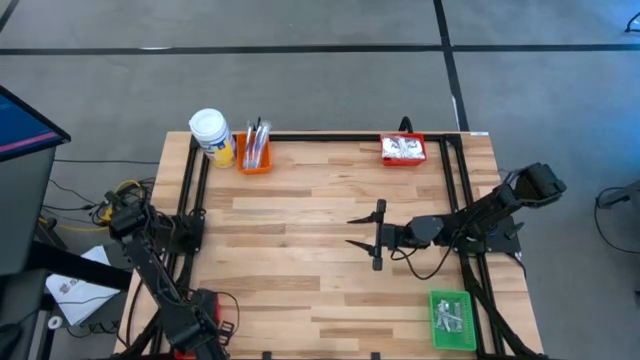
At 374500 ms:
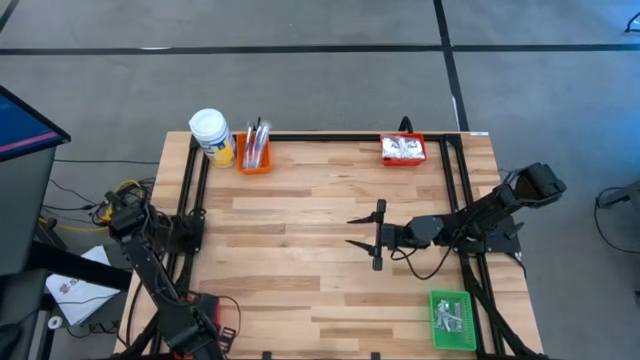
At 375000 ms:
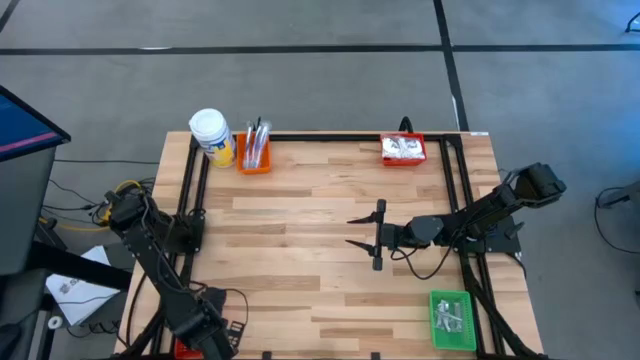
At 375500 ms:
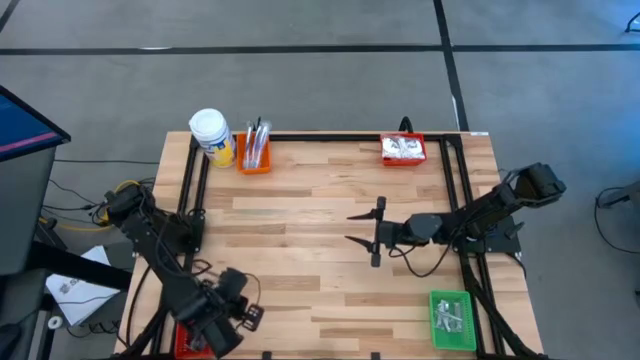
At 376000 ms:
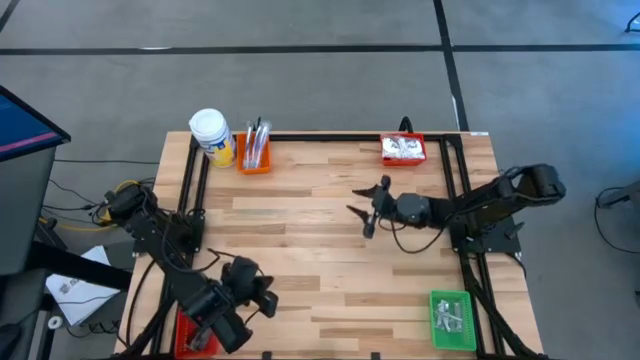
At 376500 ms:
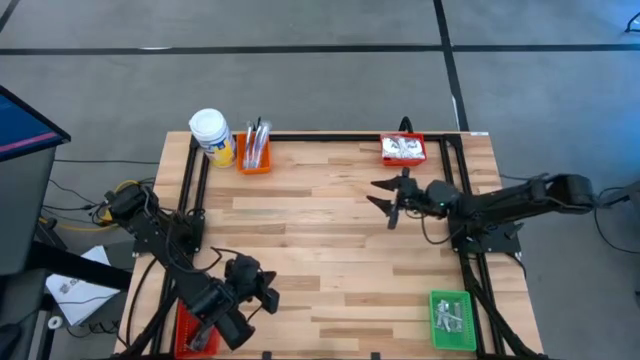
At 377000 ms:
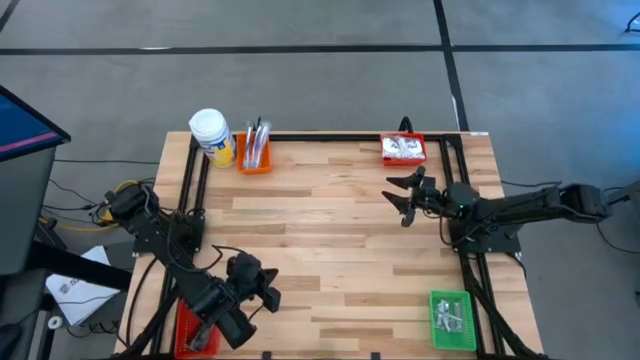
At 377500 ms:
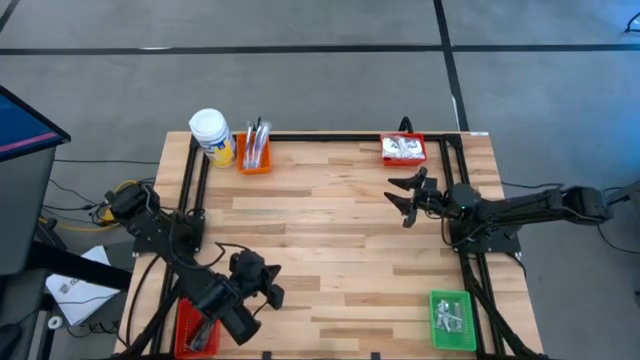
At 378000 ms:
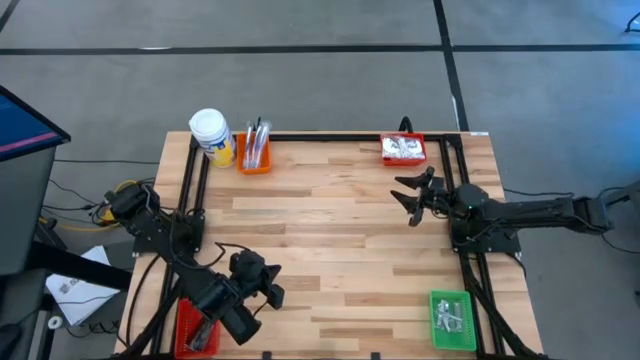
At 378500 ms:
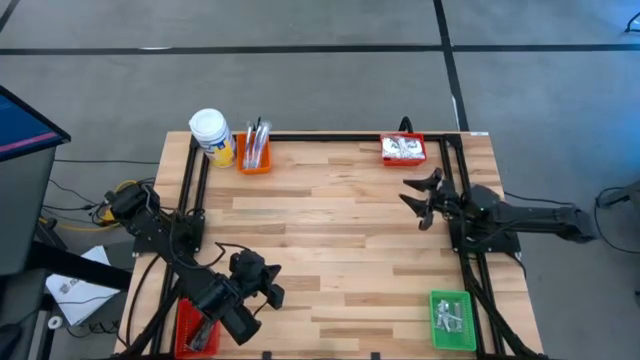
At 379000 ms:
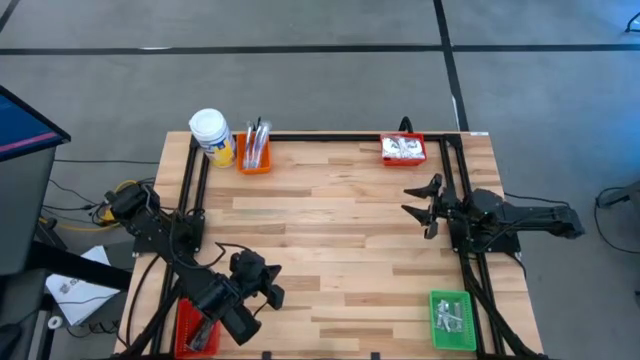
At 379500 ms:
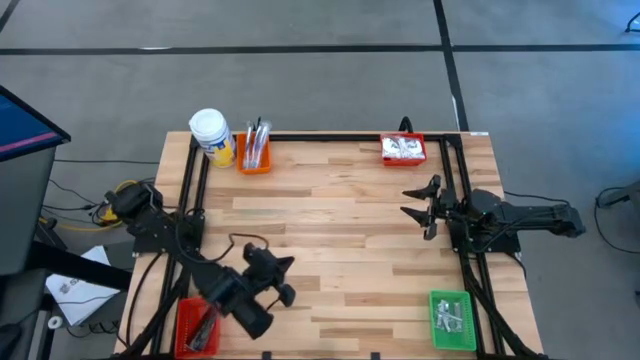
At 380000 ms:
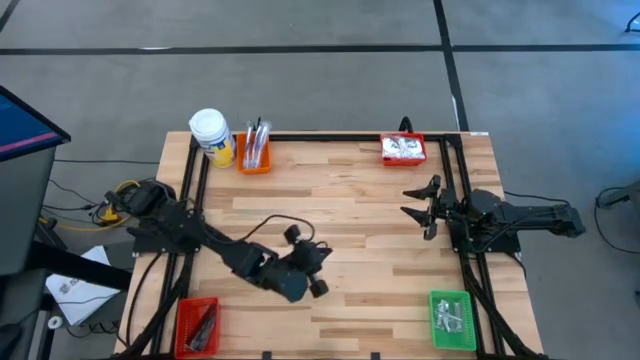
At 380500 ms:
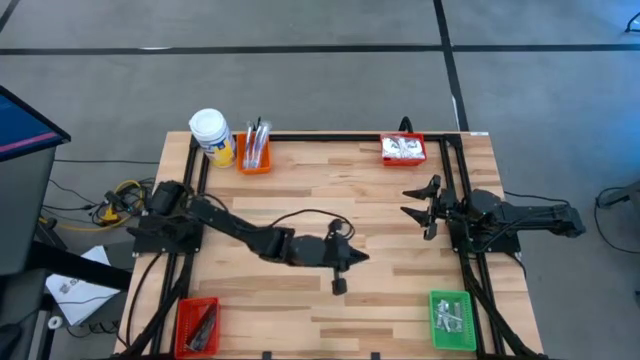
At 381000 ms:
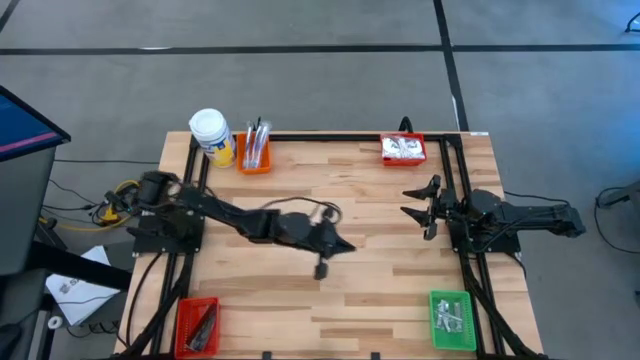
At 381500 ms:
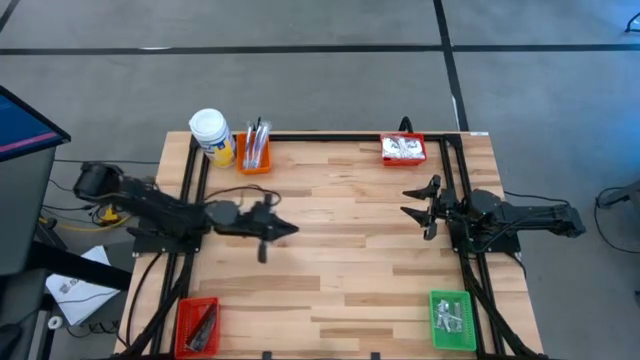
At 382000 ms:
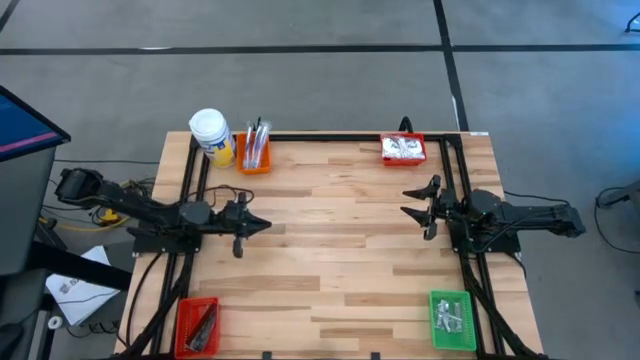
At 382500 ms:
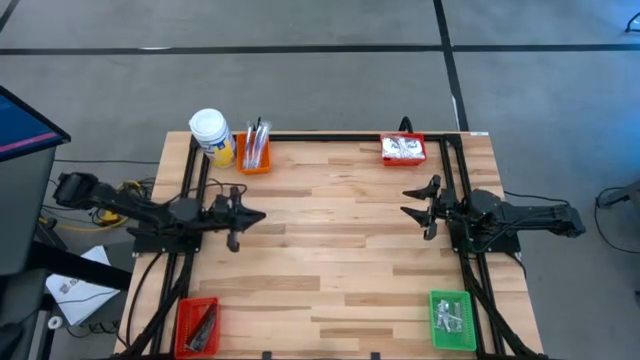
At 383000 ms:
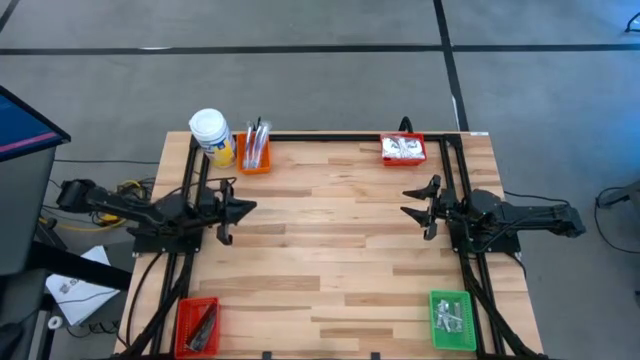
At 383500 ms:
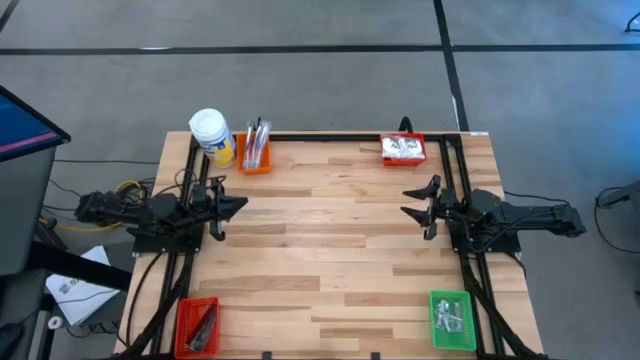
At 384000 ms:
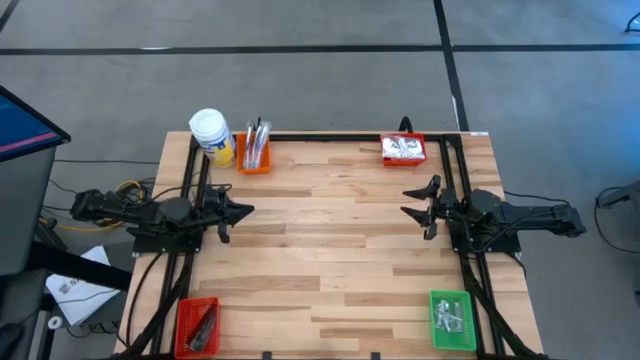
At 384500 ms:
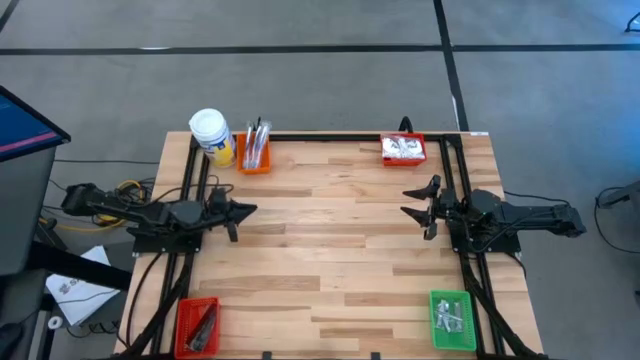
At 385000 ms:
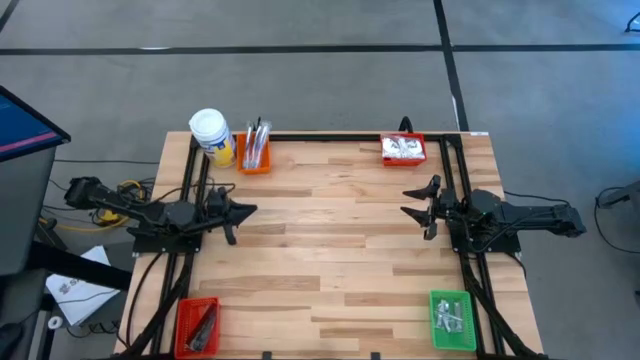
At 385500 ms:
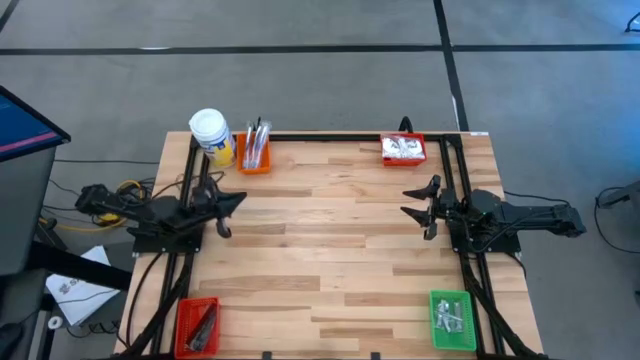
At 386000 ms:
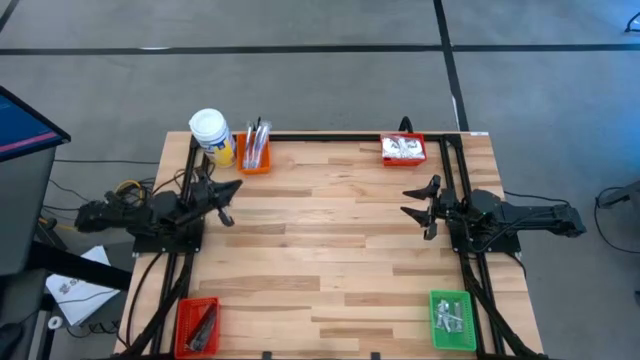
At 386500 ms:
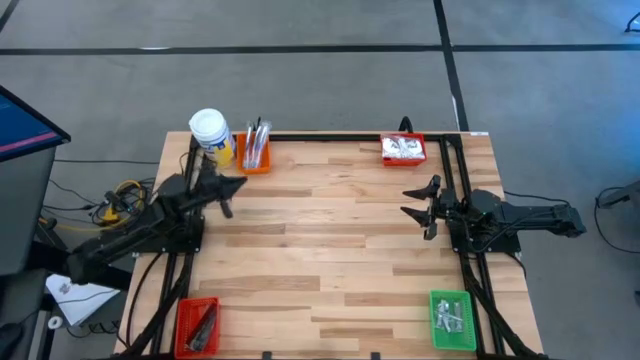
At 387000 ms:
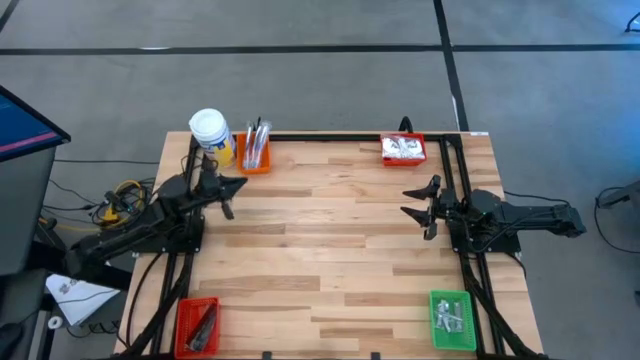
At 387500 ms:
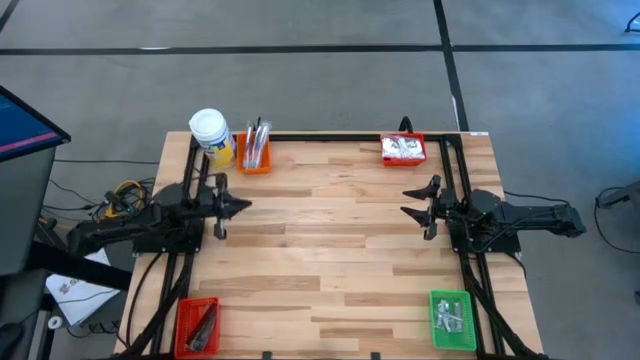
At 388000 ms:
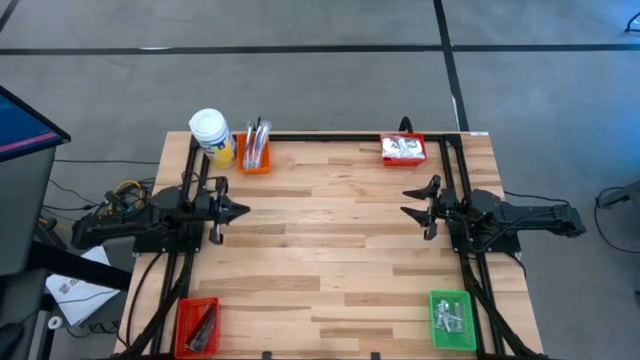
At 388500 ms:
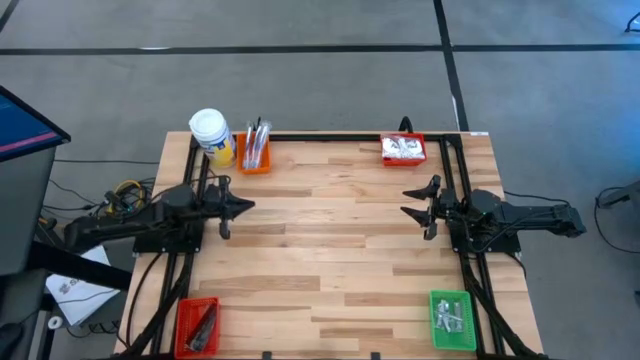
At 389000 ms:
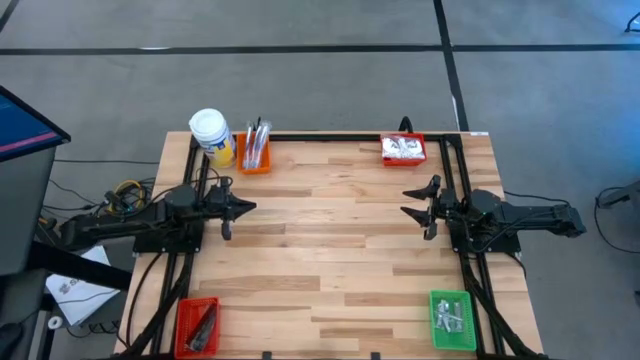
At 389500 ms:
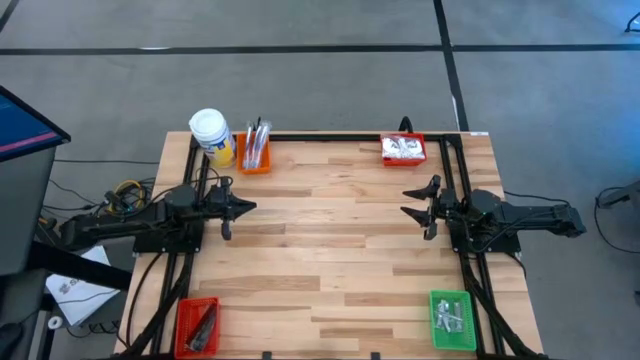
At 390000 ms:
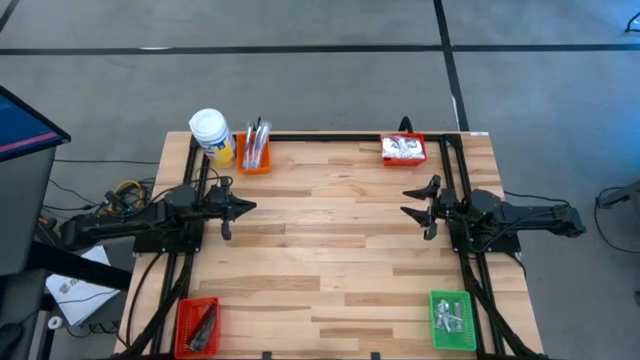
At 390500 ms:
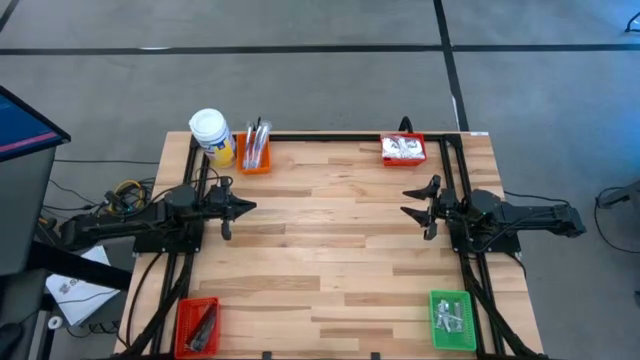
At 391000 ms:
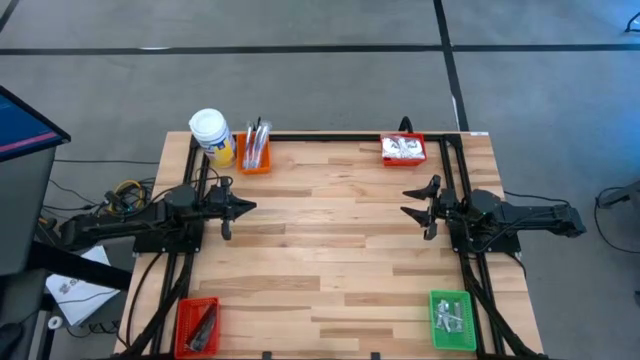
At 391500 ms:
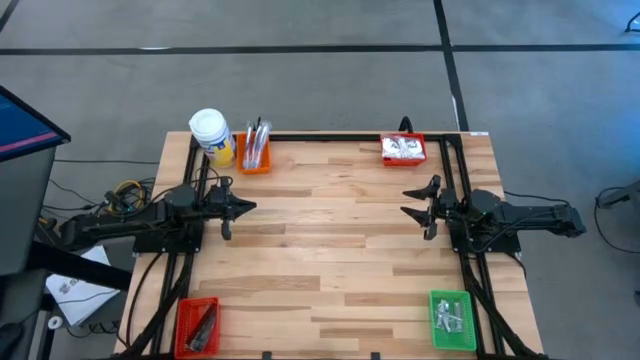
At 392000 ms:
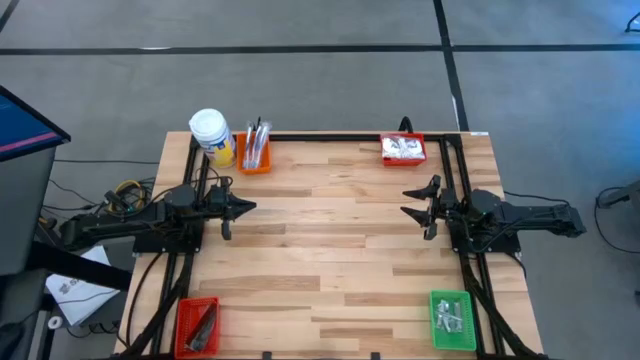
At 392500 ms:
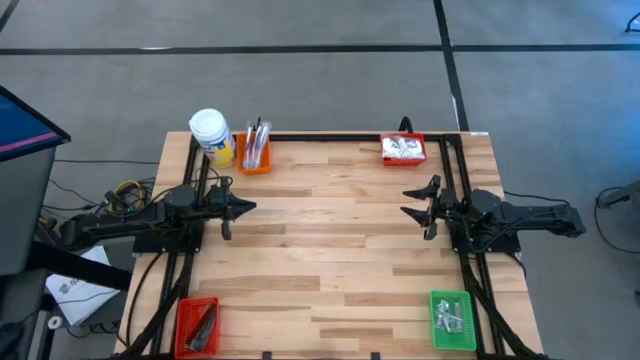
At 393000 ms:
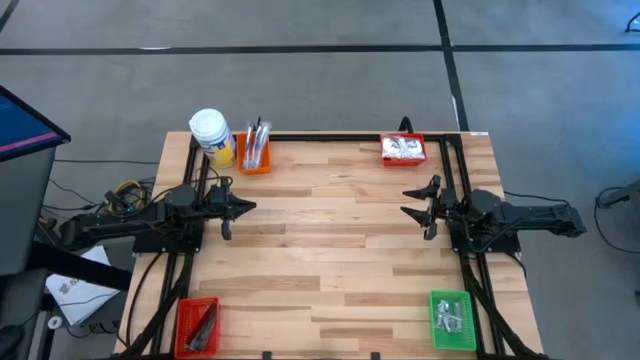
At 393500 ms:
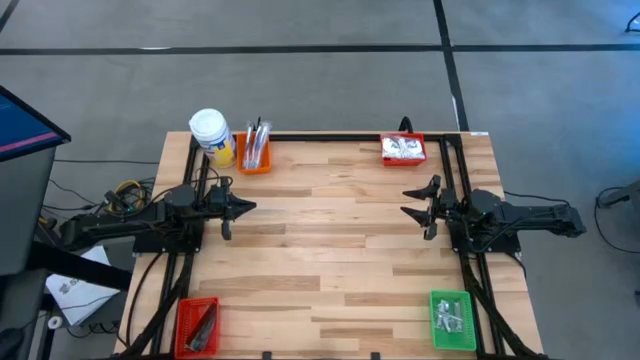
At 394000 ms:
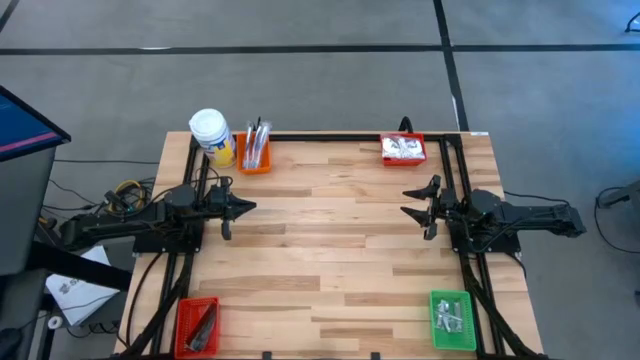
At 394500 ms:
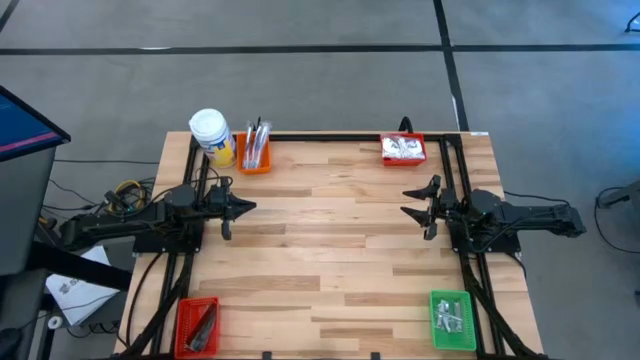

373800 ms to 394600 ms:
Task: Pick & Place Travel size toiletries
Return to Home Position

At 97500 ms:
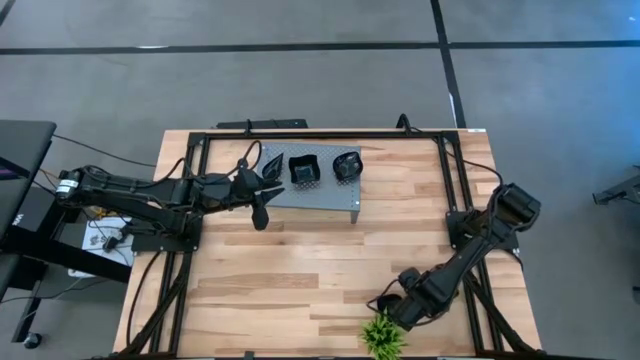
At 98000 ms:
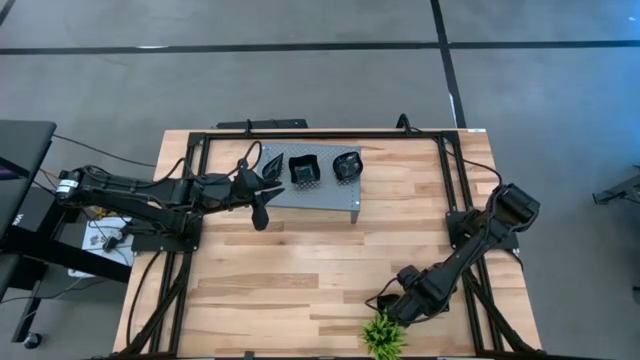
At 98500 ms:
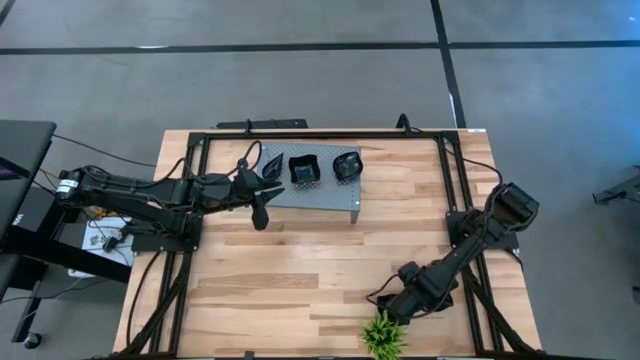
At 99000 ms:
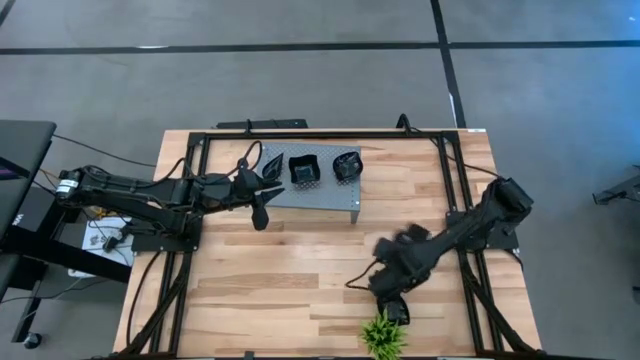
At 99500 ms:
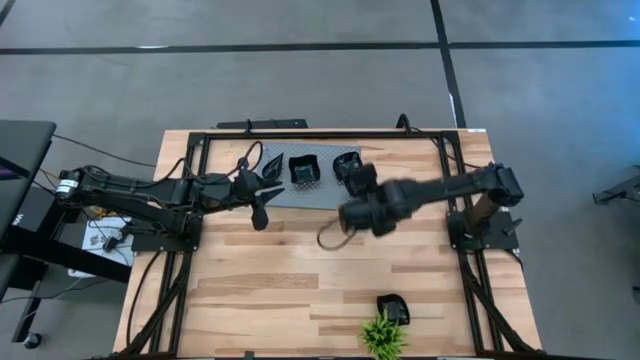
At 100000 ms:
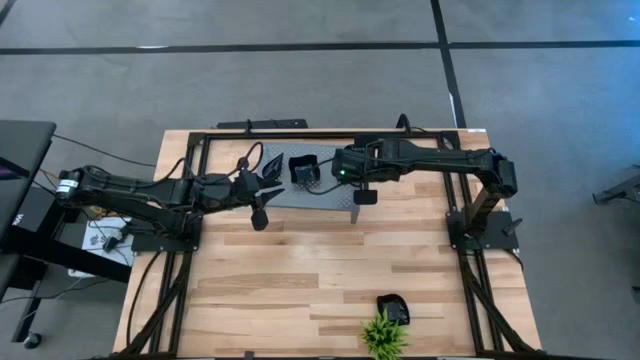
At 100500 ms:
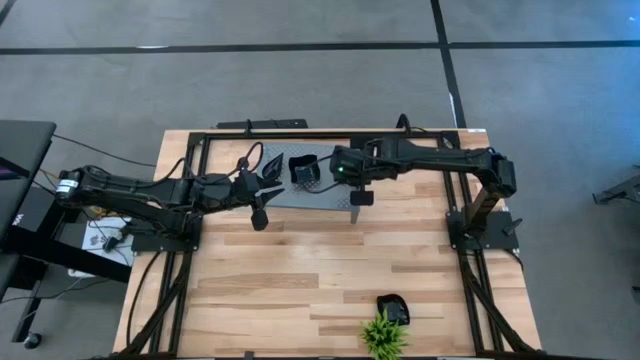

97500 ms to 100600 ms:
Task: Pick & Place Mini shaped plates
Stack the black leaf-shaped plate on top of the black leaf-shaped plate on the shelf
